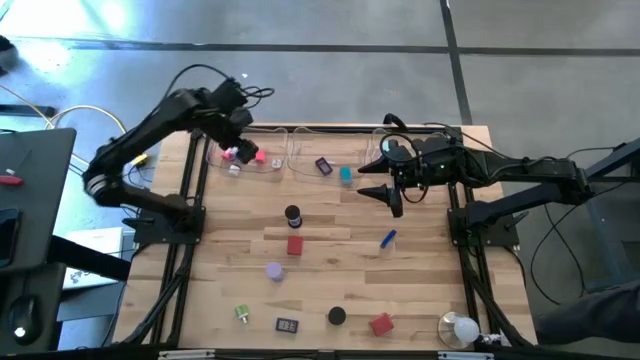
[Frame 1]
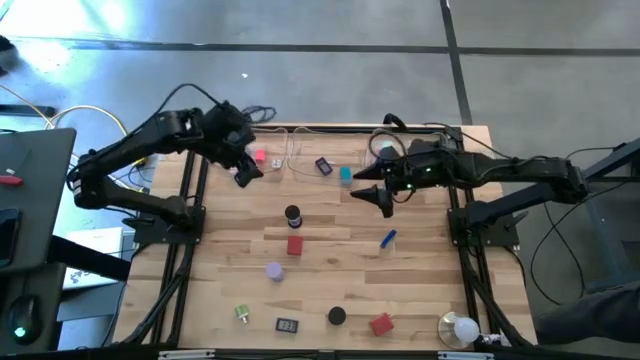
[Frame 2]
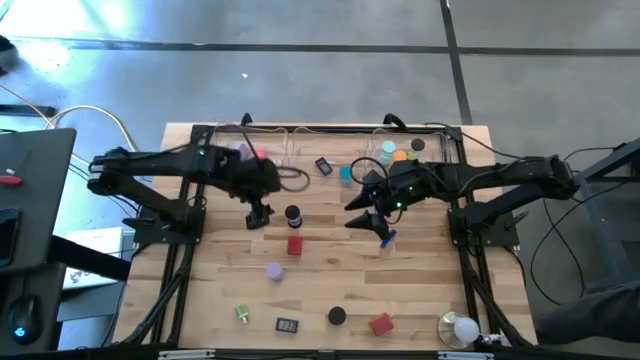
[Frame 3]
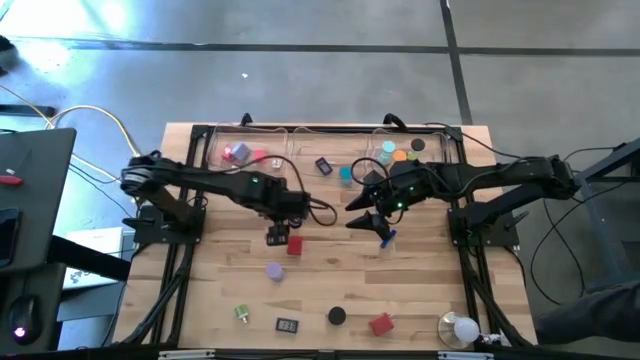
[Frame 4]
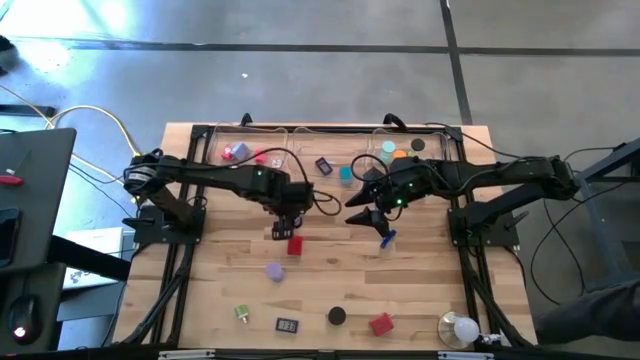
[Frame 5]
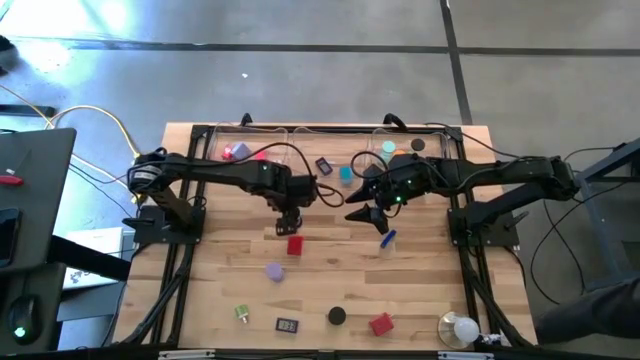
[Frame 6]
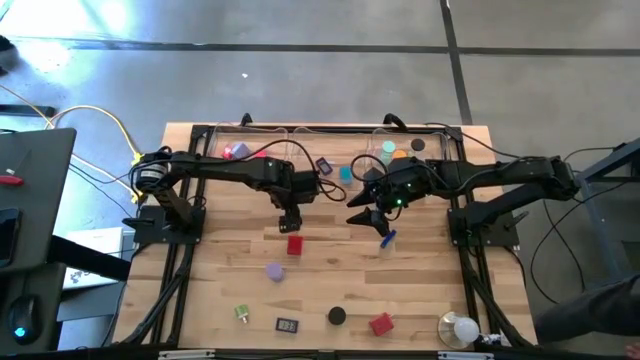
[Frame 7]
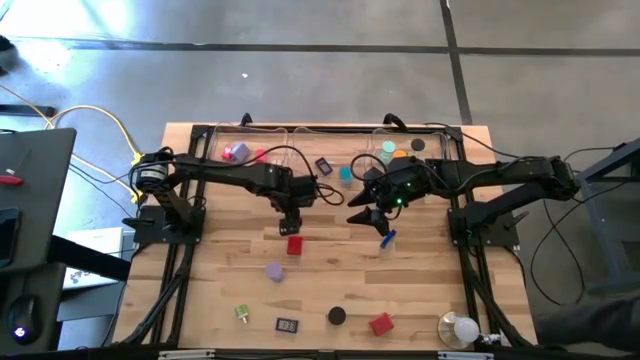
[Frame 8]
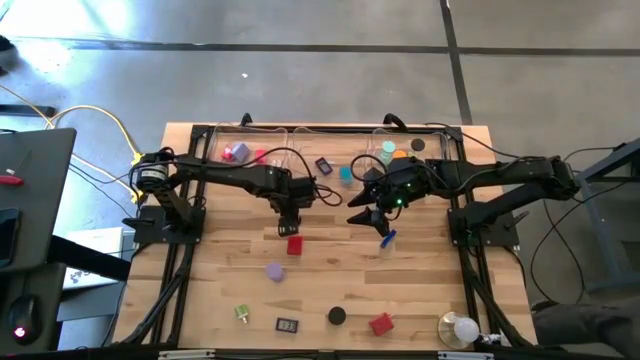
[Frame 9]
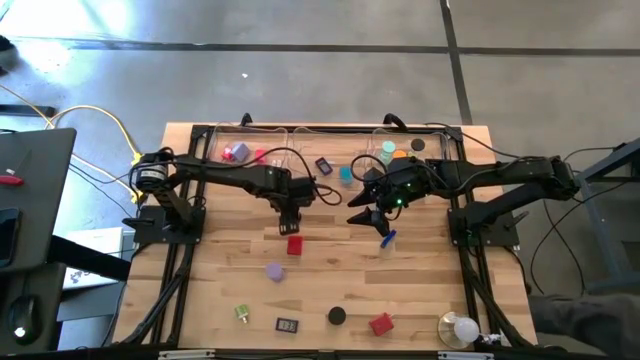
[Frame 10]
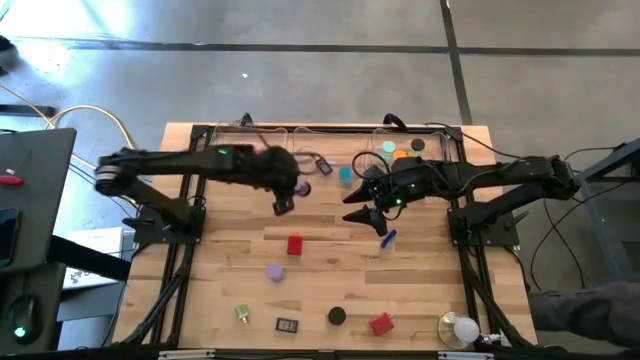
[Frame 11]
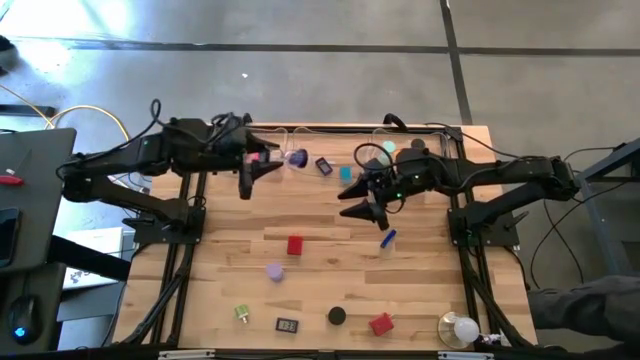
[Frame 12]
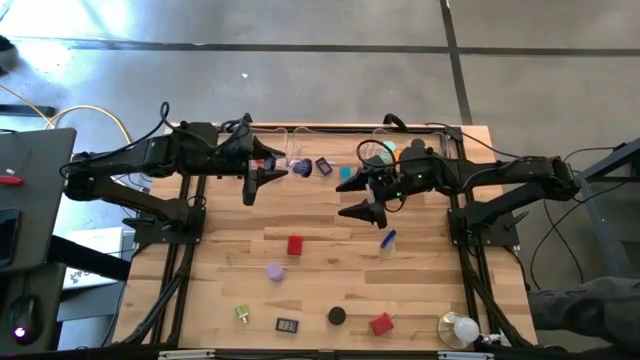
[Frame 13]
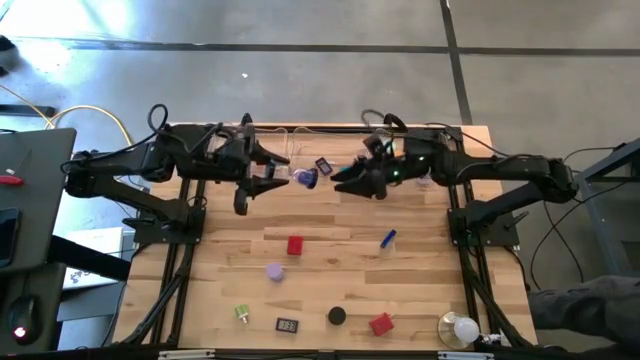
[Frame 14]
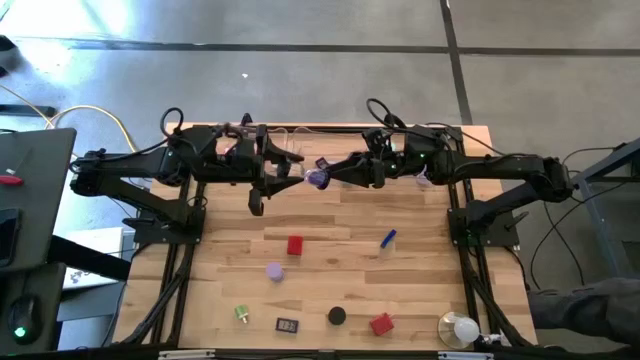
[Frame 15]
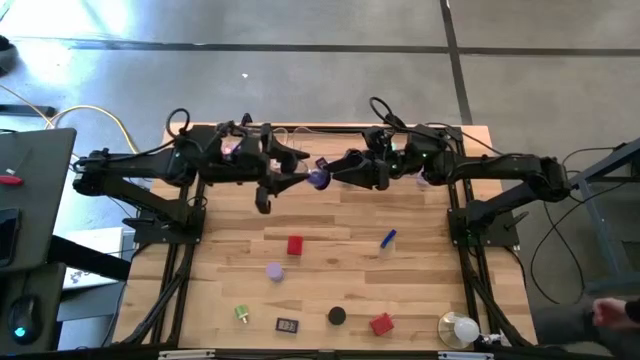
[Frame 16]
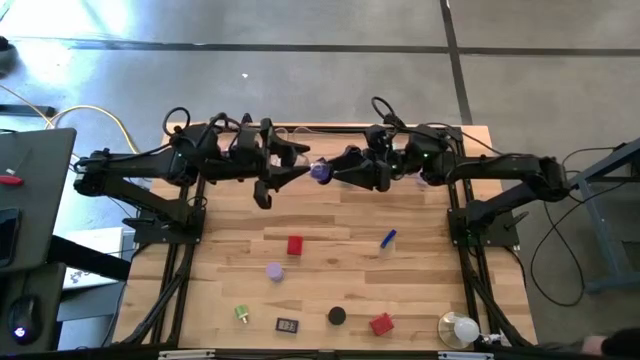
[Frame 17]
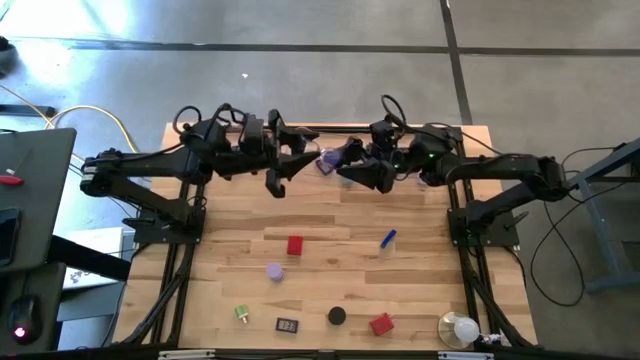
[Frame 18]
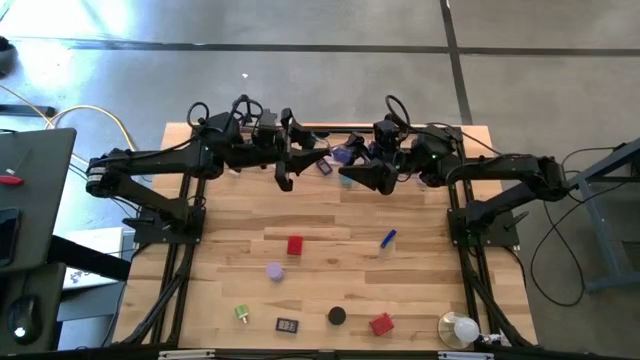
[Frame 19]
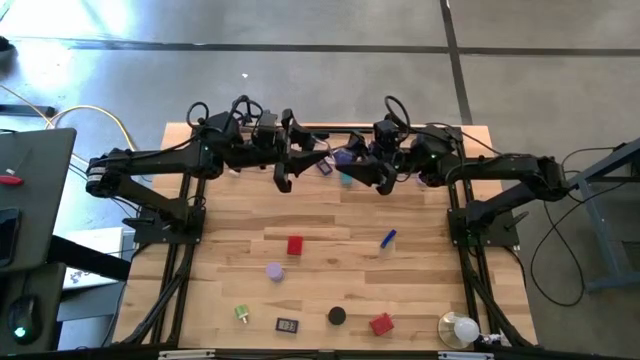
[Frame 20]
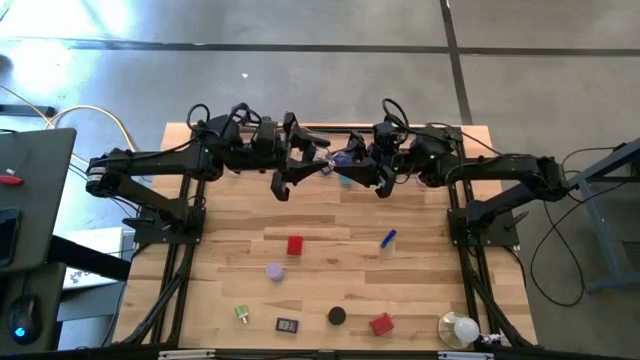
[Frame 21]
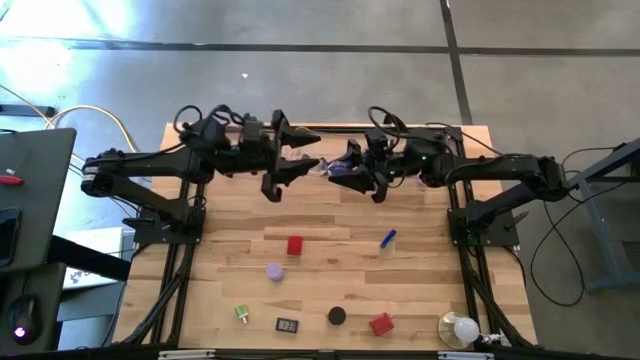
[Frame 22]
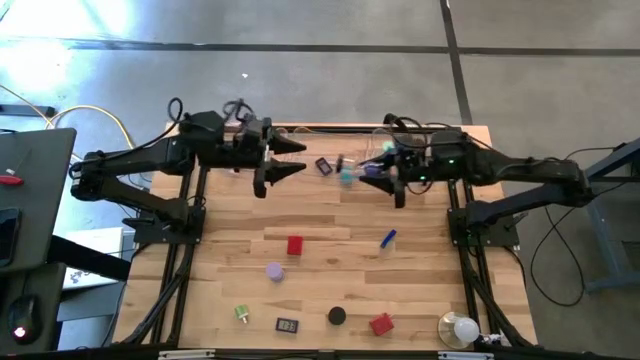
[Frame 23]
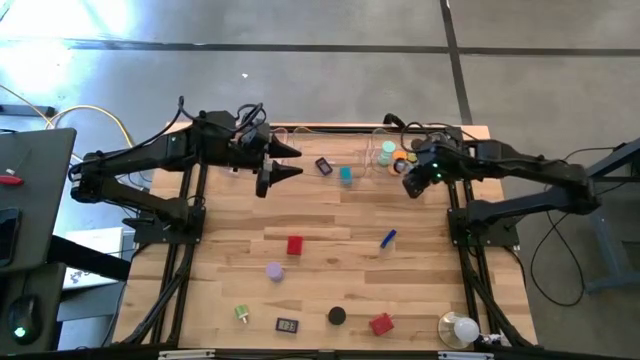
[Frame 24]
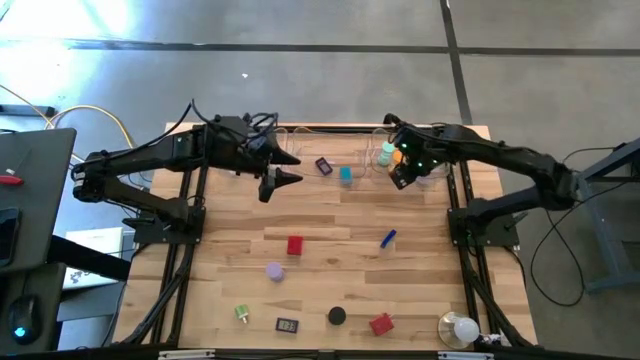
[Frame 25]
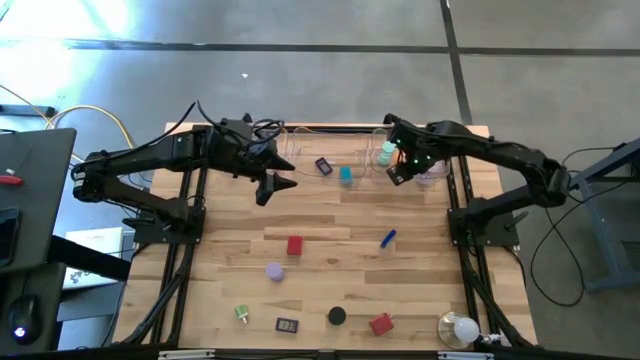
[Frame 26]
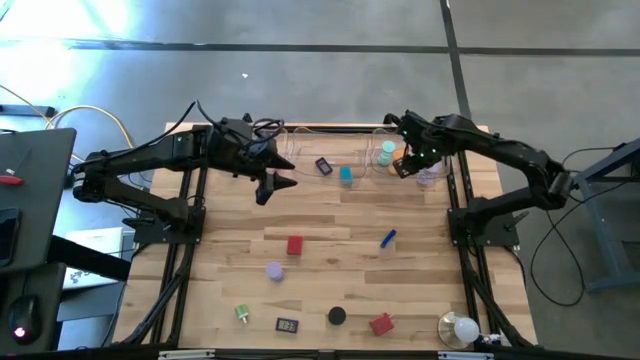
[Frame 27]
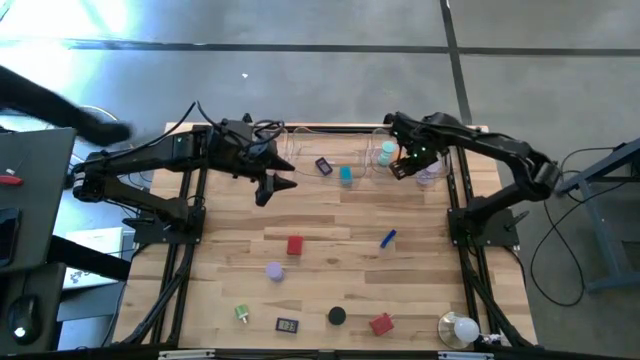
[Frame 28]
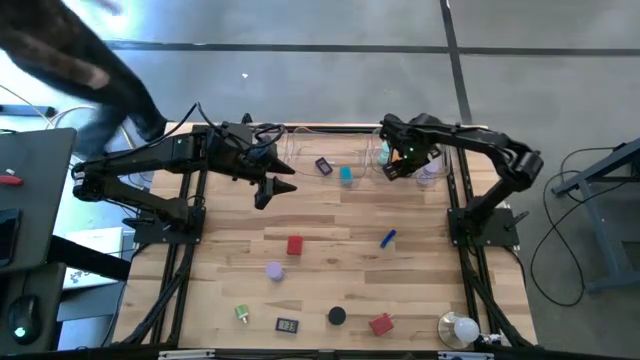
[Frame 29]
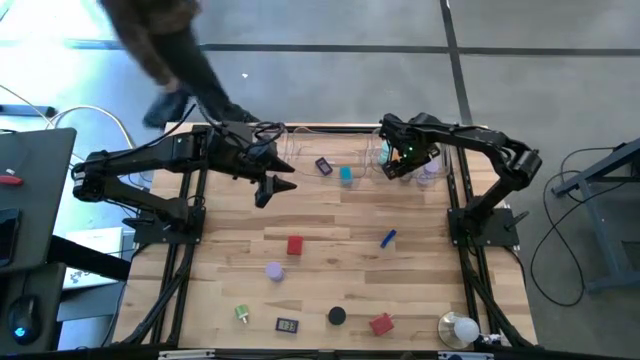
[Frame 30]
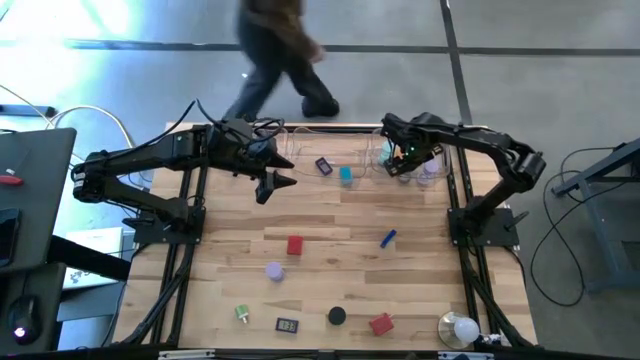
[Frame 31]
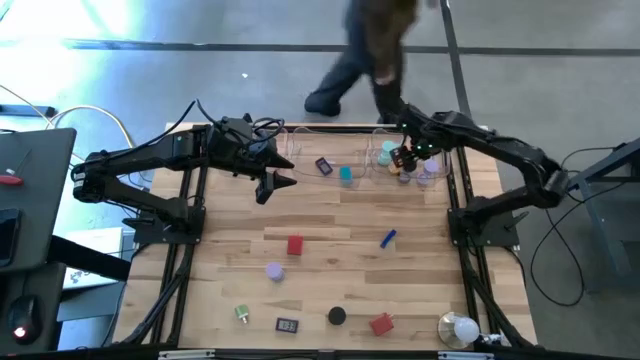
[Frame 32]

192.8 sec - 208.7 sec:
Task: Pick & Place Office items
Put the top black hourglass into the right transparent bin

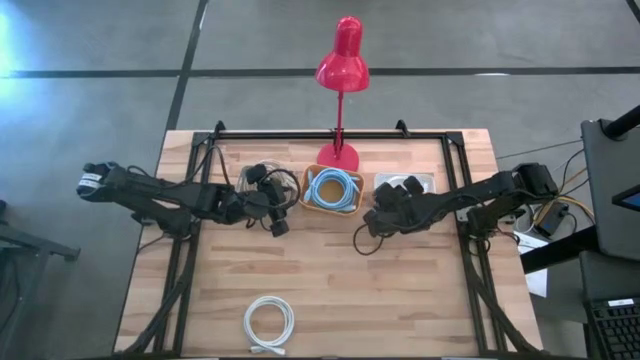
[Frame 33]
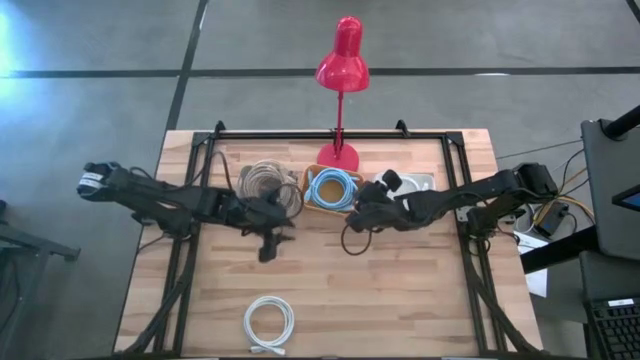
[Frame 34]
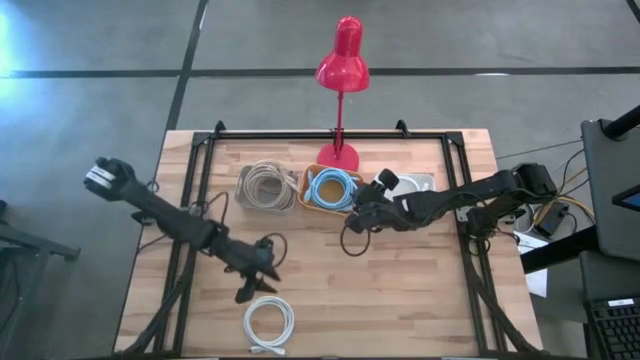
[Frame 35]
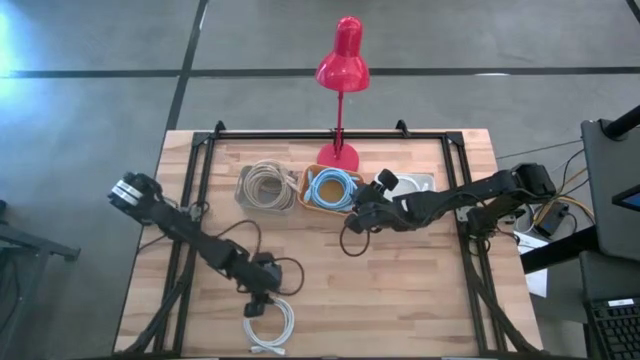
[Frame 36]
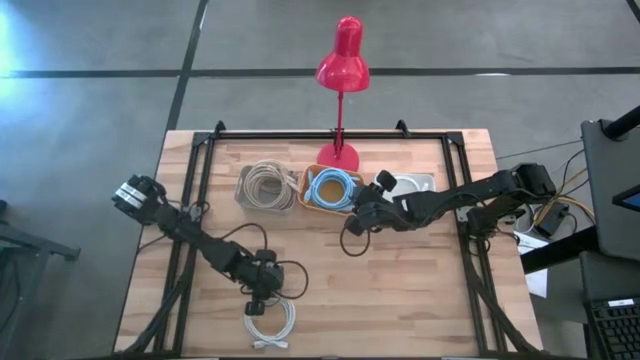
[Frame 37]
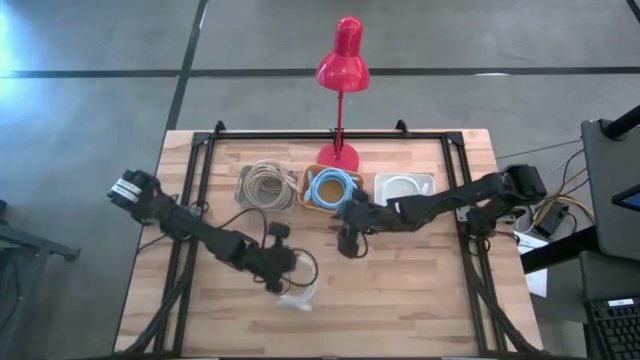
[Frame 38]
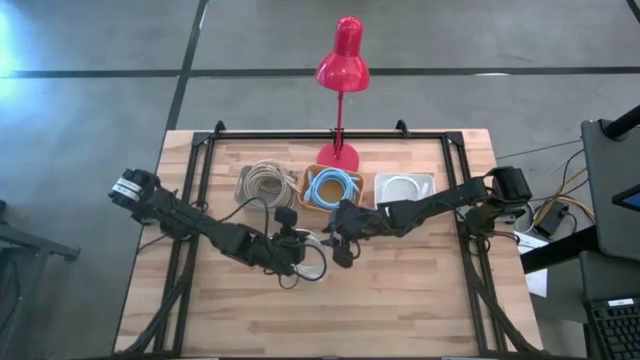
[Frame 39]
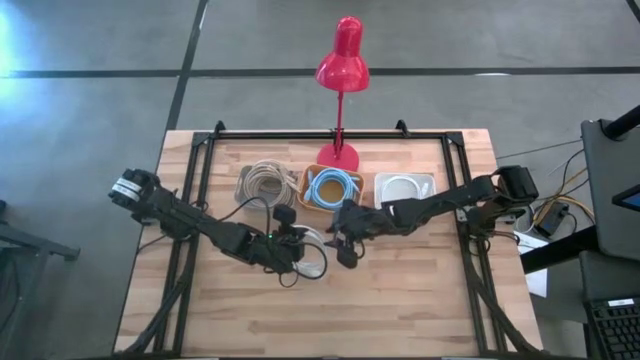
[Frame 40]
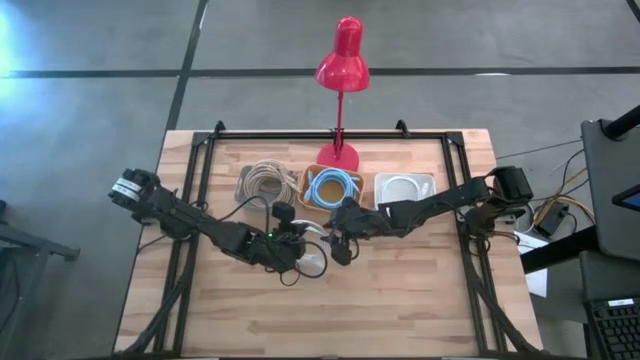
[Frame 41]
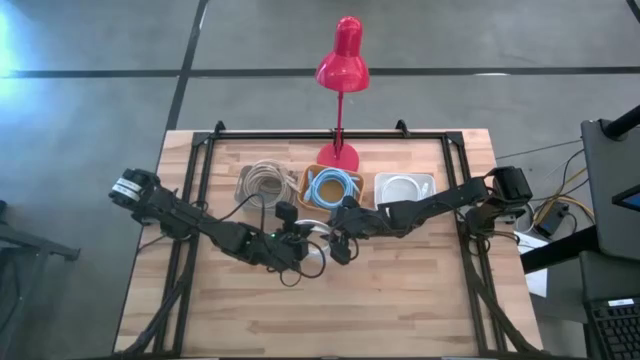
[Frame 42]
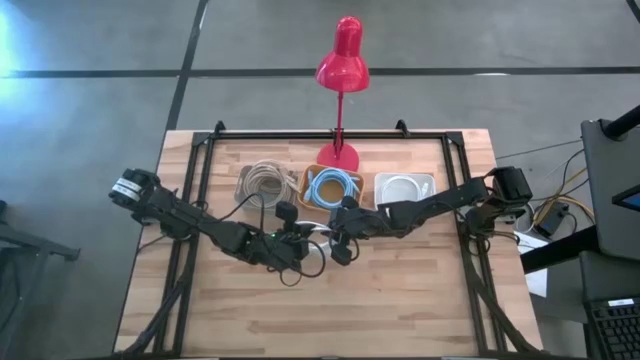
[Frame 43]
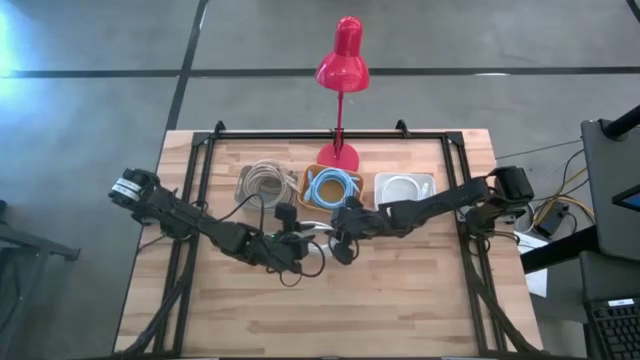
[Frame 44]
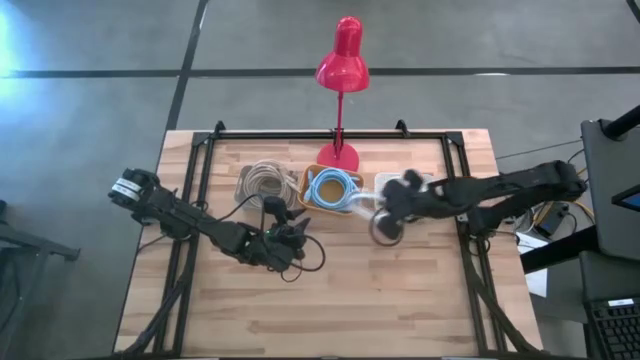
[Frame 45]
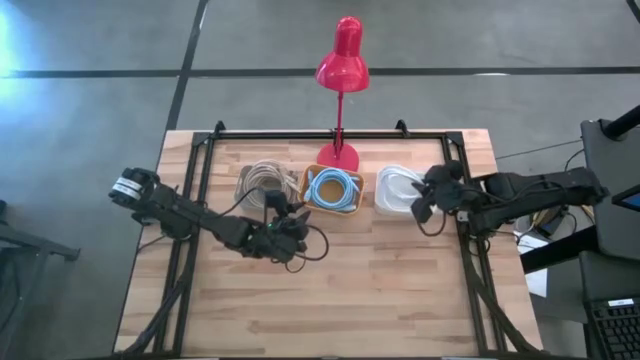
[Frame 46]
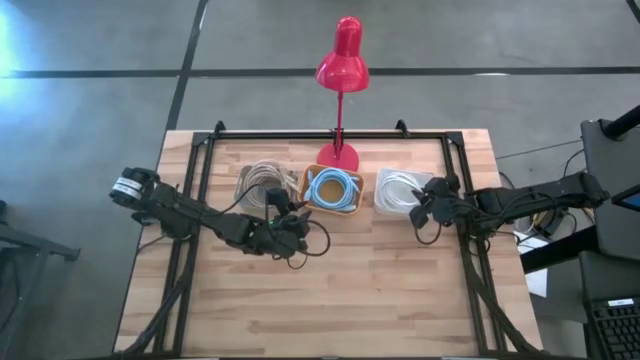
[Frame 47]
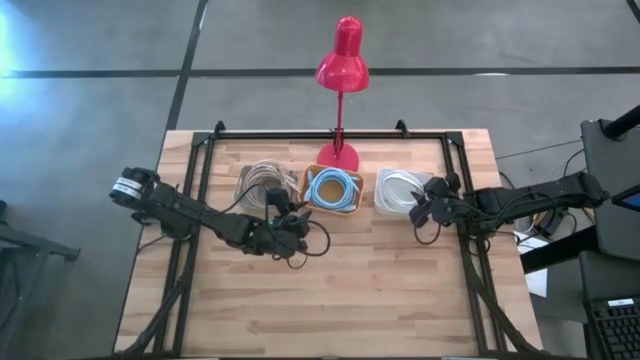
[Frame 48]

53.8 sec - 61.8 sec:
Task: Sort HDMI cables
Put the white hdmi cable into the white bin
